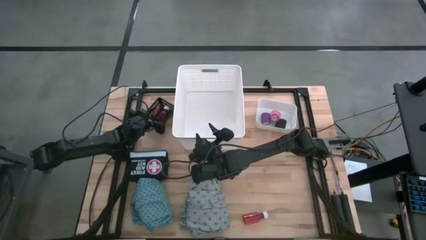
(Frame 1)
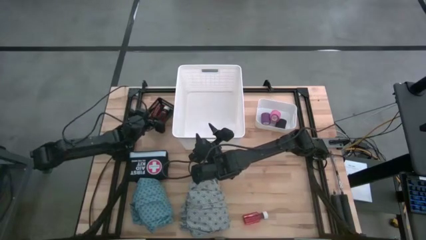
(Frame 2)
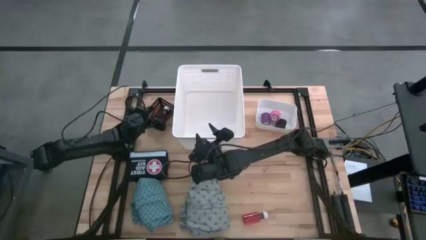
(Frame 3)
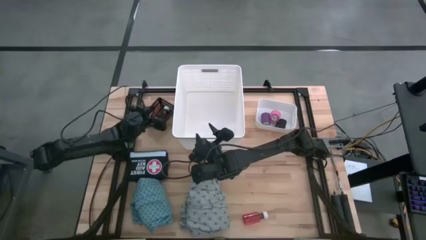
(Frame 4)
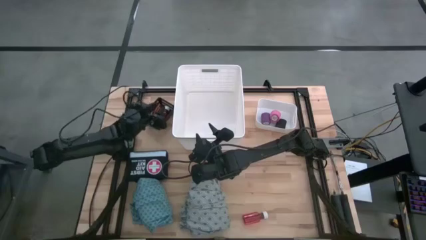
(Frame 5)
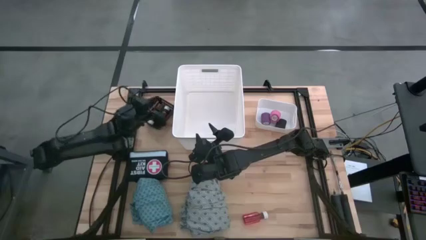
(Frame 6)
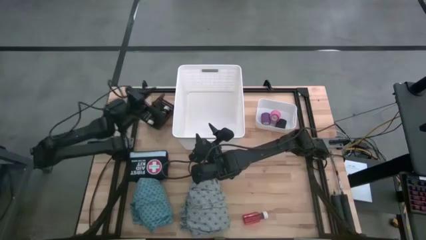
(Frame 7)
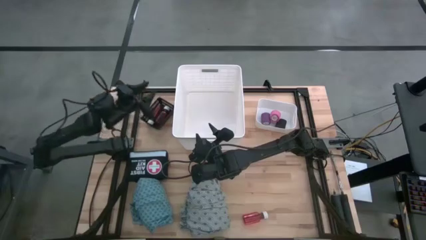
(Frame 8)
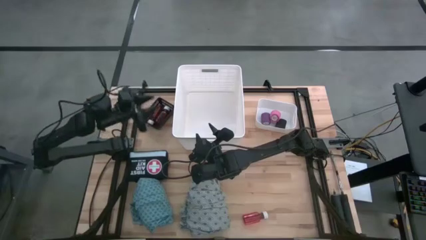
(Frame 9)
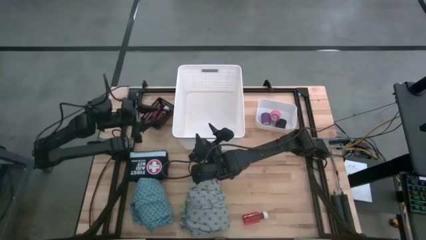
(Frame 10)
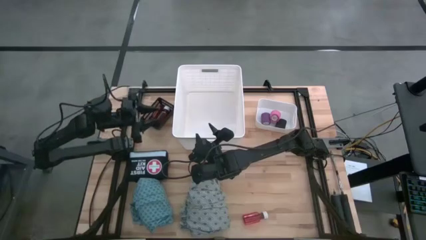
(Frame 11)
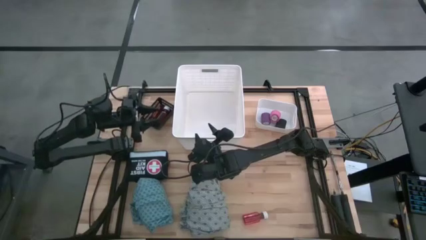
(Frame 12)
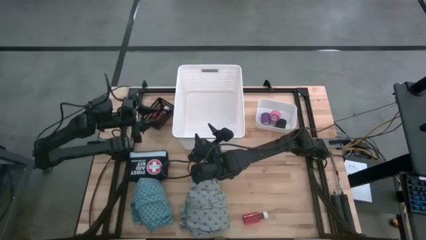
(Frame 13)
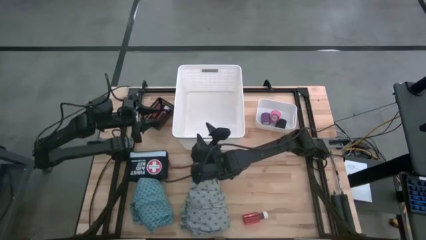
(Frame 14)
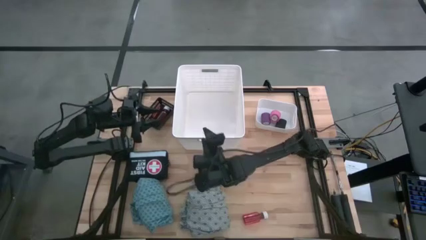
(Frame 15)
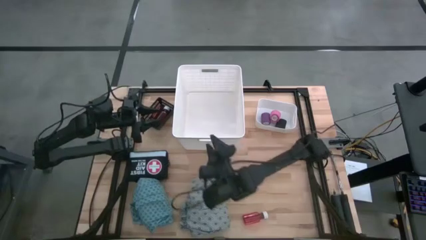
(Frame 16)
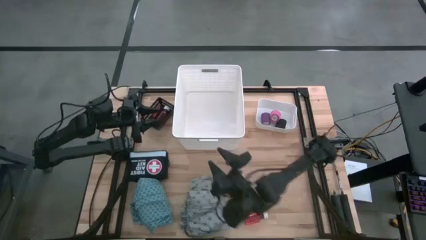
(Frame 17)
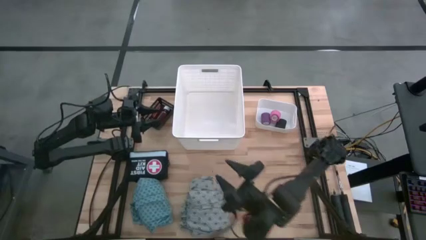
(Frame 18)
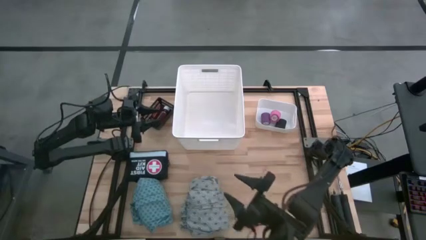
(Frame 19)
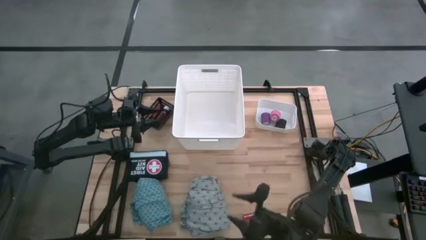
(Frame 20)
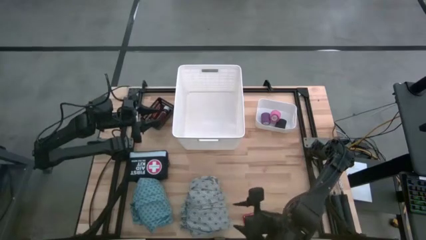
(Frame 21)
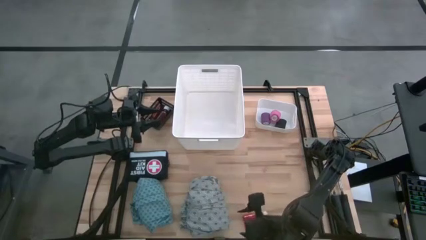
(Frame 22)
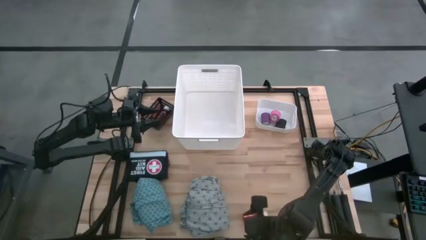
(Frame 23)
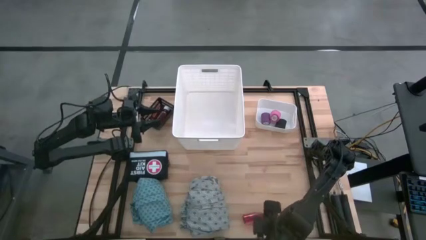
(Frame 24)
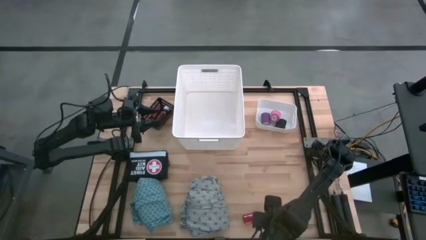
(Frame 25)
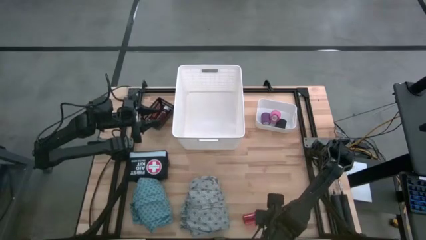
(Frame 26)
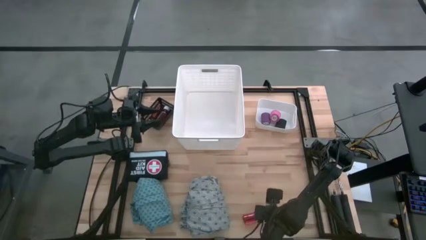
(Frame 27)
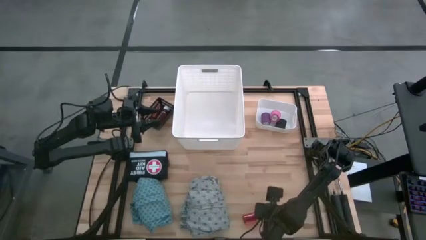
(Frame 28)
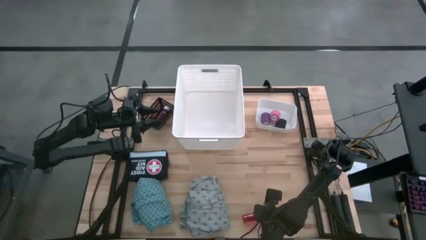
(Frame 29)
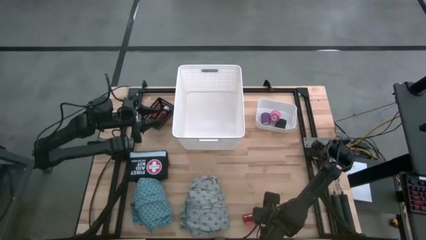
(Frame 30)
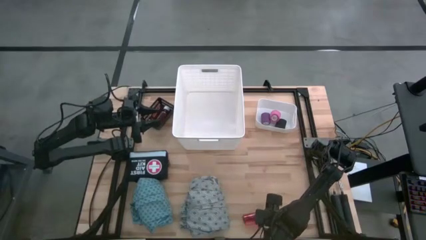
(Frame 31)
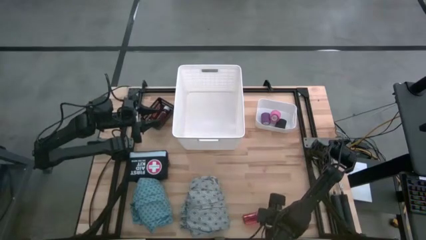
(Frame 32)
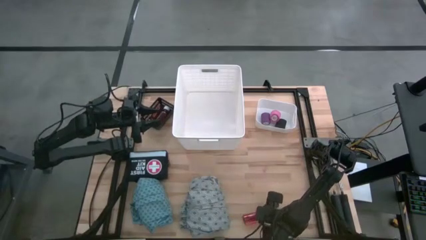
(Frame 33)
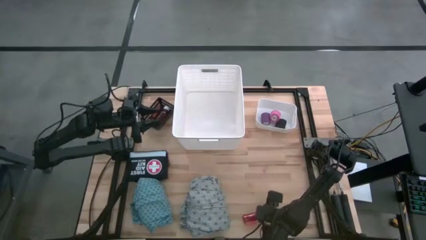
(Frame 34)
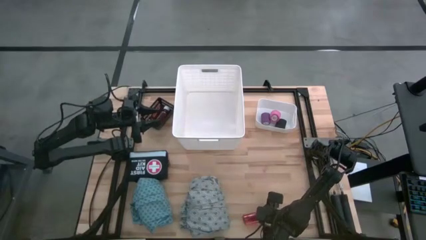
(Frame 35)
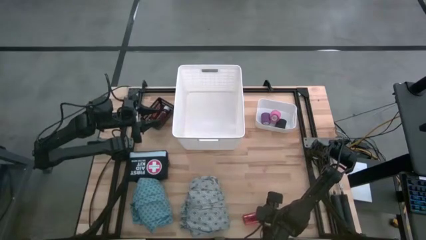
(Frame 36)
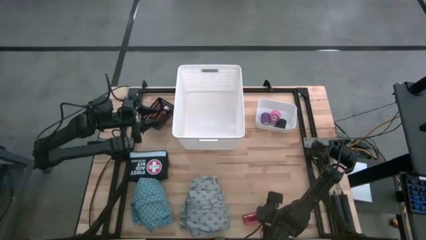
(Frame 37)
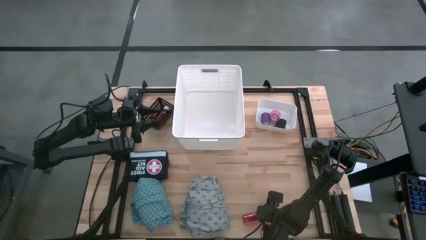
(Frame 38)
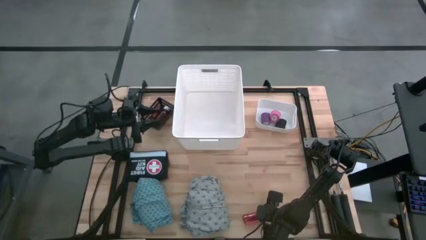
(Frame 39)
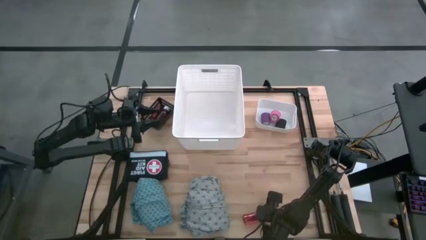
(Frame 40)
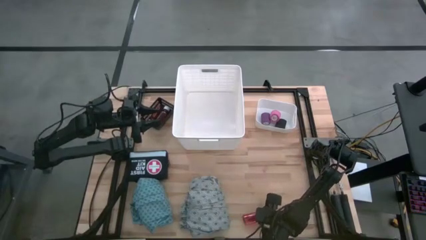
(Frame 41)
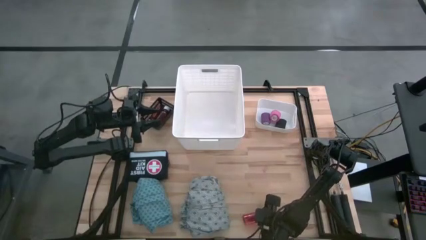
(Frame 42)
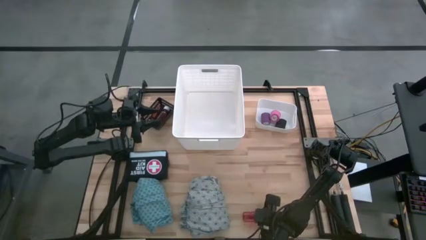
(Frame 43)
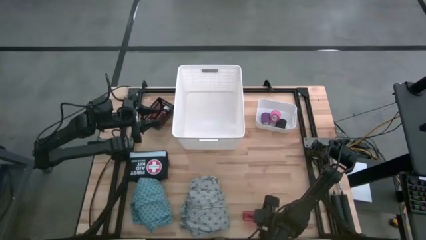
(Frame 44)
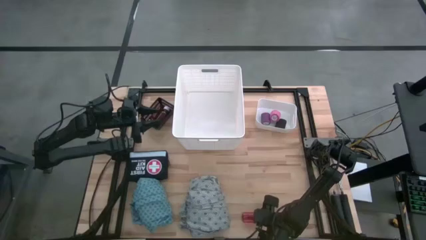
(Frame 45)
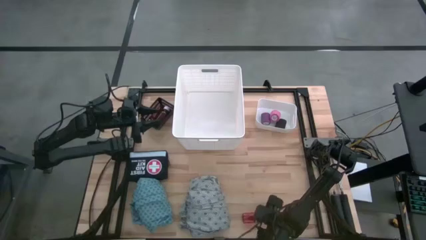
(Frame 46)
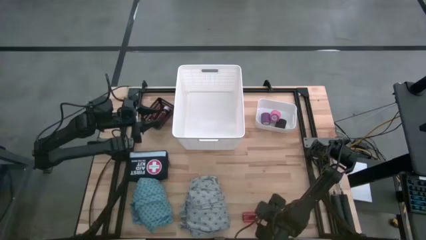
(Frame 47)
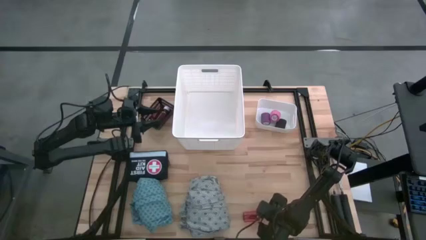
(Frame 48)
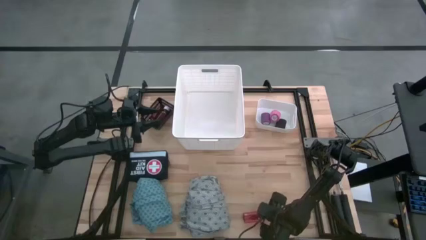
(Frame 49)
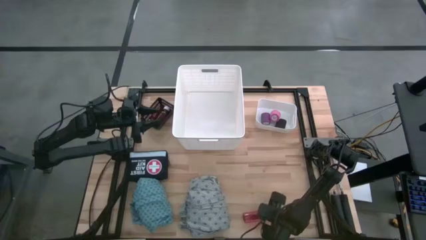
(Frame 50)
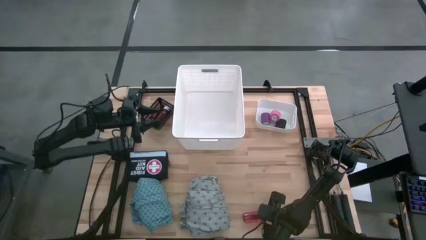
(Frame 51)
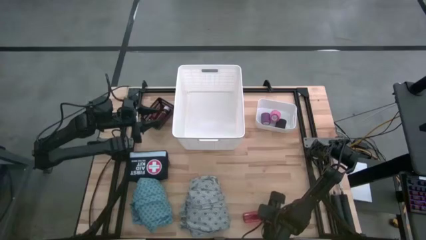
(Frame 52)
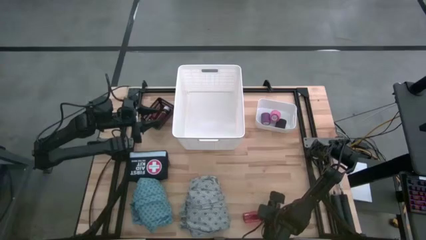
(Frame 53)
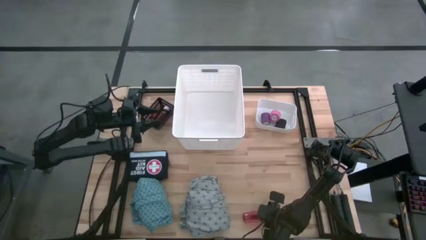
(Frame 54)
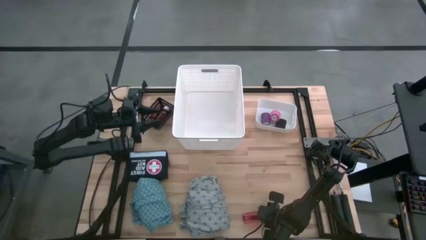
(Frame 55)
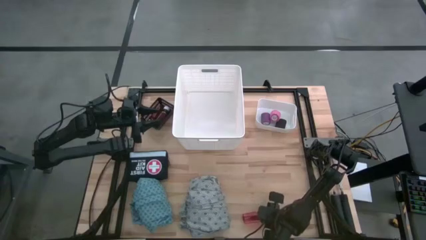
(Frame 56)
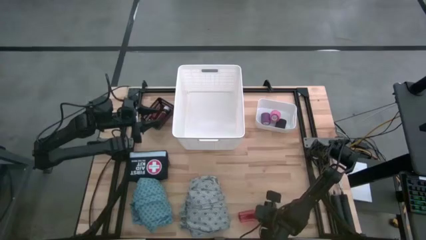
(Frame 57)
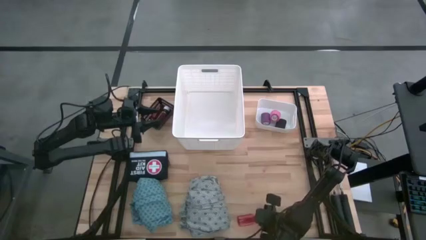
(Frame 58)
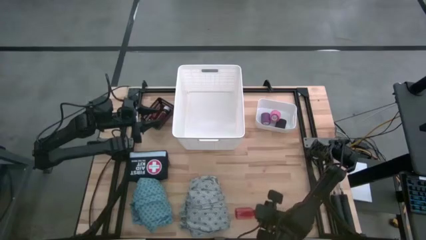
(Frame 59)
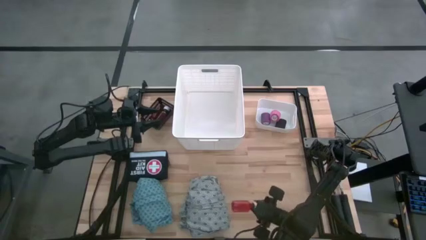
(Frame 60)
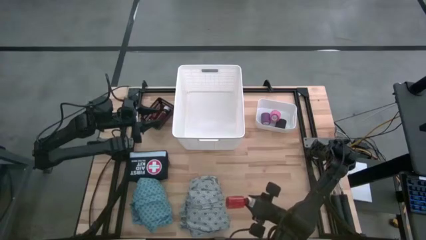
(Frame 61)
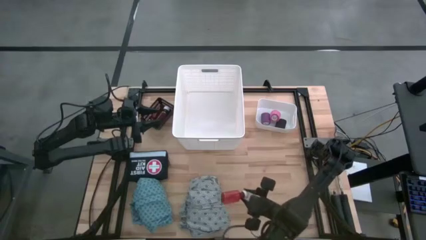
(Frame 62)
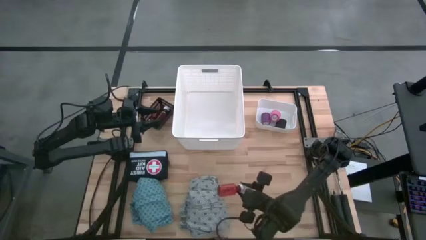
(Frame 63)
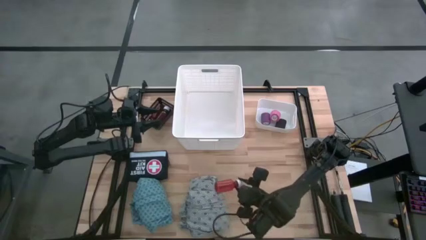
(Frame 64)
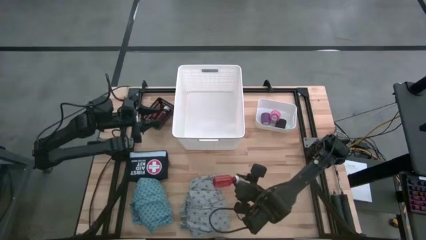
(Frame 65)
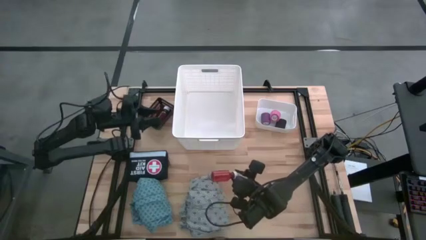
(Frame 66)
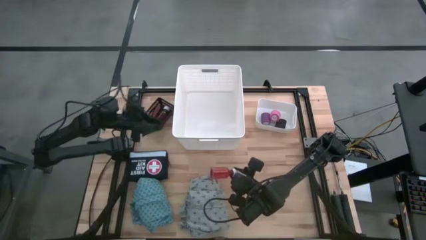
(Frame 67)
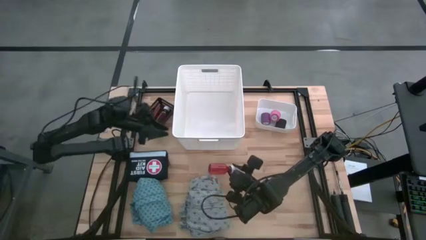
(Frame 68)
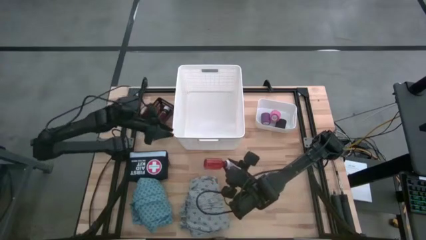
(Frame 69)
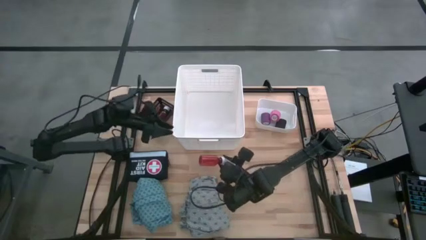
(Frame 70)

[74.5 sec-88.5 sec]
Task: Pick & Place Medicine items
Put the red medicine bottle into the black bin
